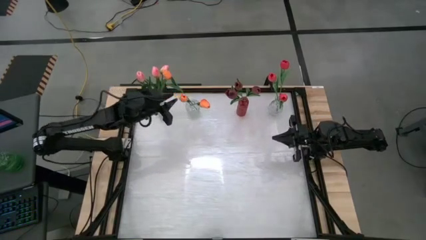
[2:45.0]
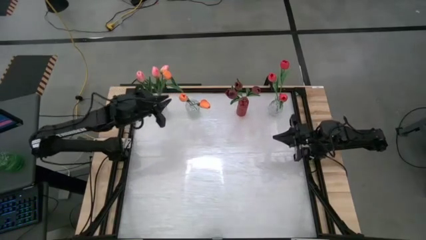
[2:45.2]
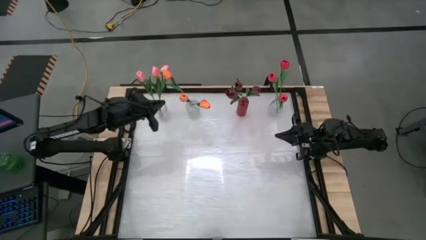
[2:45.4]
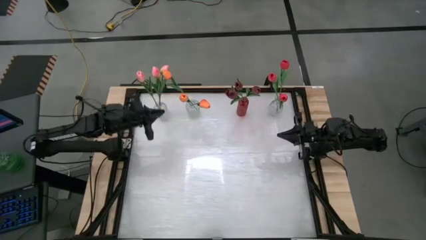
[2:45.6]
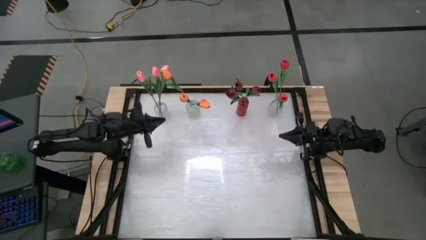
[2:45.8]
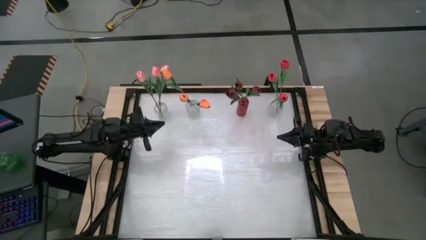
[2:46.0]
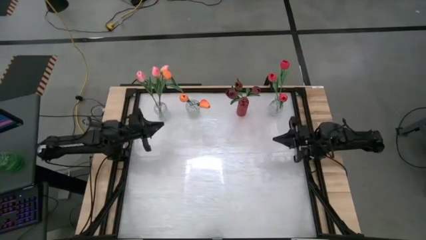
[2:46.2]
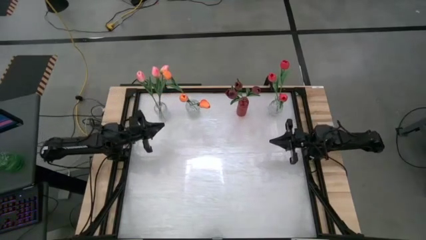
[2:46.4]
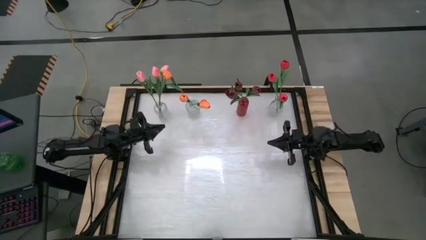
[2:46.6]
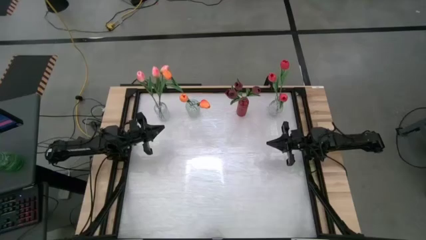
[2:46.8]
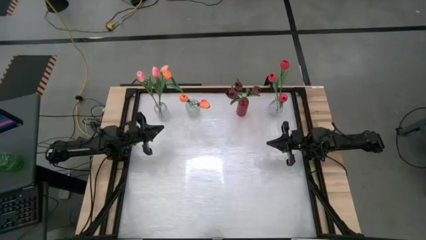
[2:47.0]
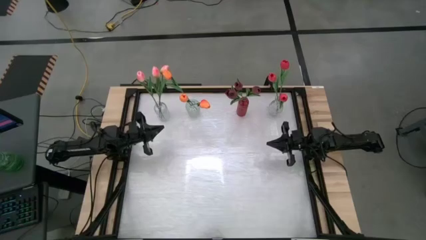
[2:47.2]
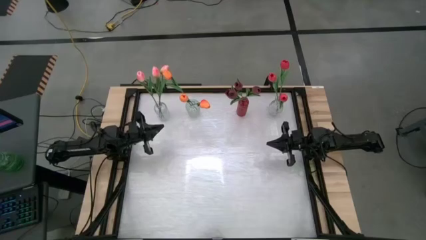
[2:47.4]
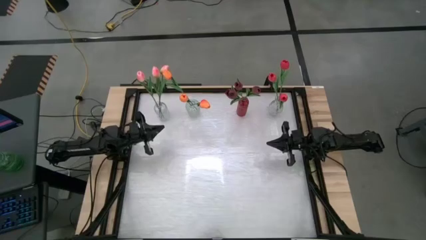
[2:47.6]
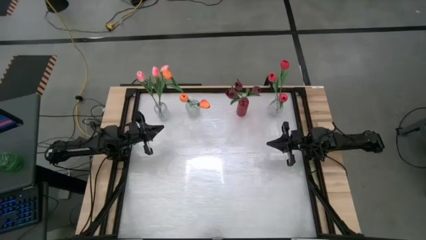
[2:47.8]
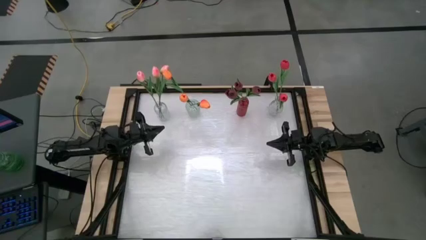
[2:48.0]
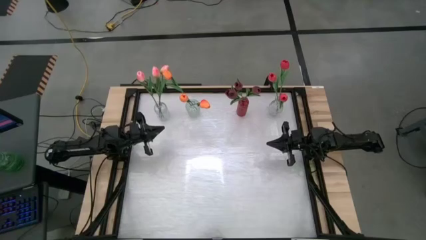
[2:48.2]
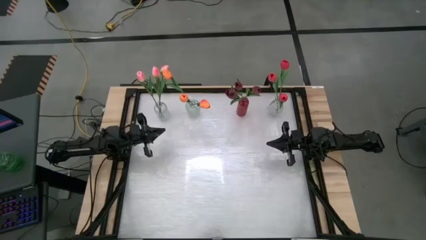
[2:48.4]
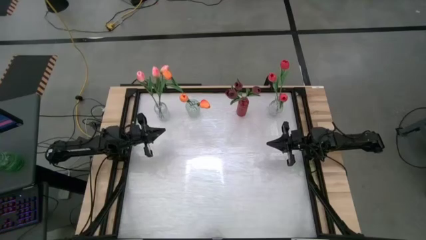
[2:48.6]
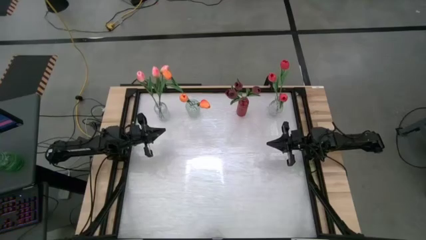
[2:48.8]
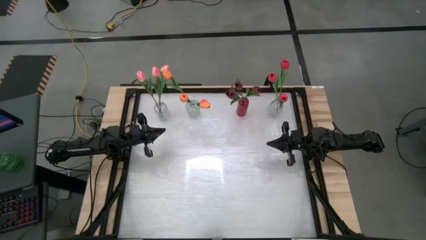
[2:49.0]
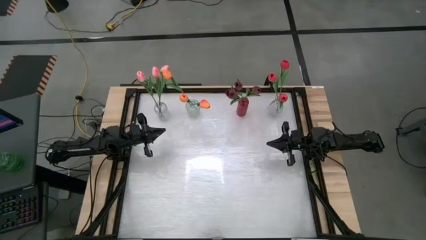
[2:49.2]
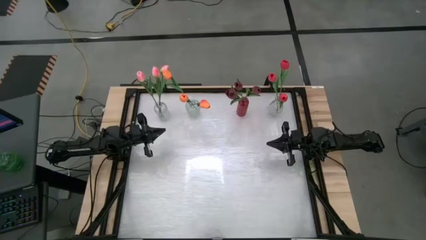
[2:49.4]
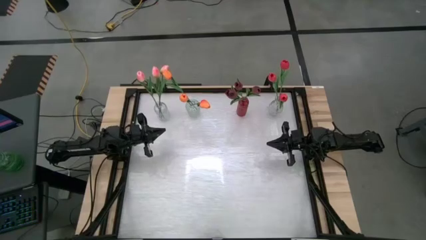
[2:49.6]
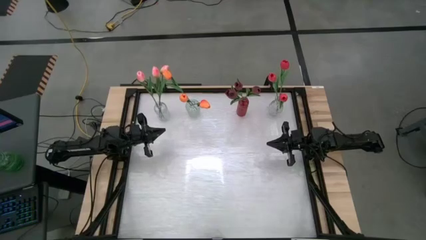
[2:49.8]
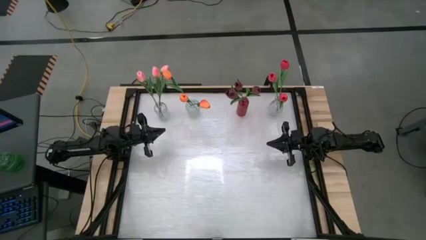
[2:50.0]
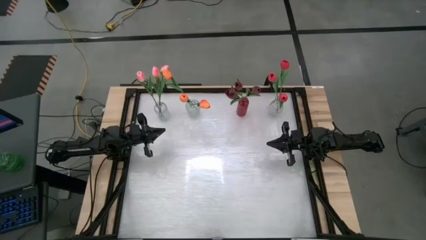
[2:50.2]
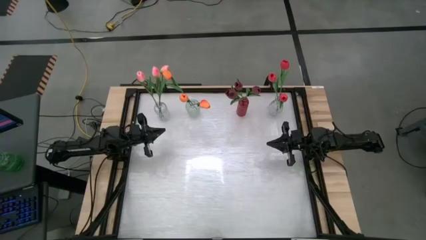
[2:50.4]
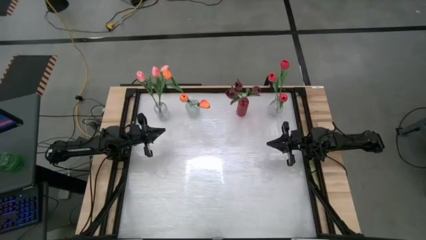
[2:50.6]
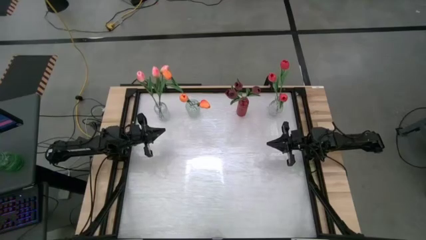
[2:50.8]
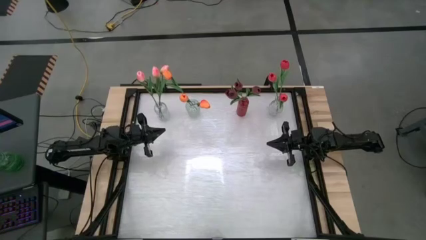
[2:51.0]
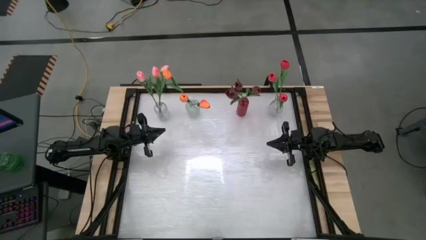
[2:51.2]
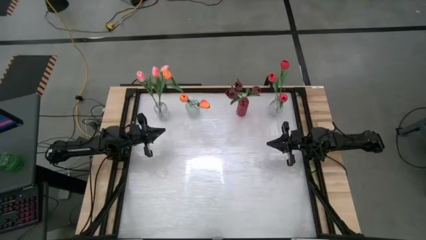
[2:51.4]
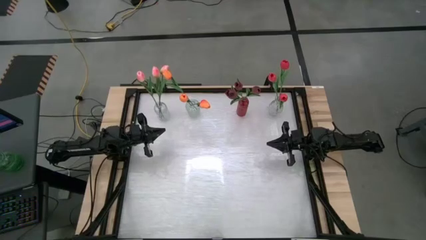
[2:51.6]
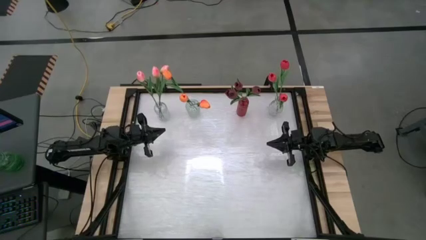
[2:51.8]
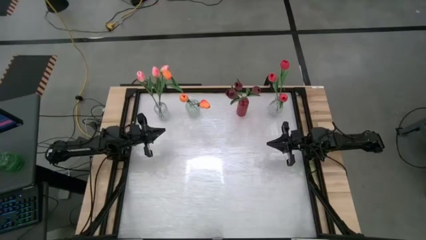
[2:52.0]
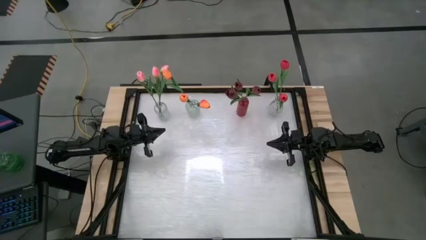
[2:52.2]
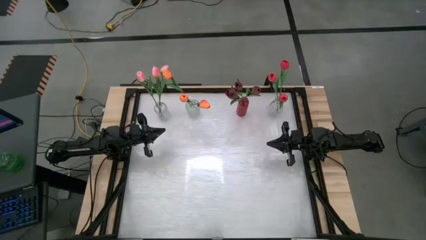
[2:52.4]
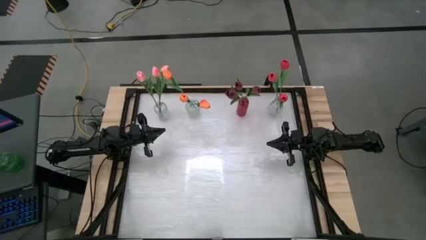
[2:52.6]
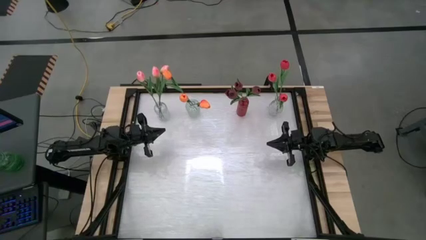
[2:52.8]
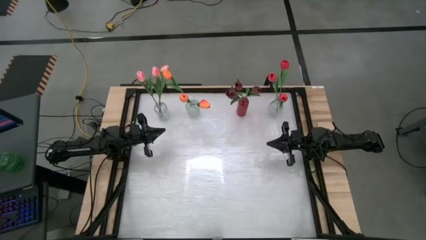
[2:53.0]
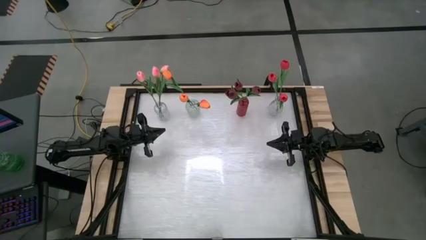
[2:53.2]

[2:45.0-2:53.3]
Task: Sort flowers into vase by color
Return to Home Position

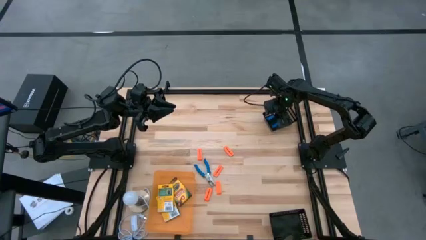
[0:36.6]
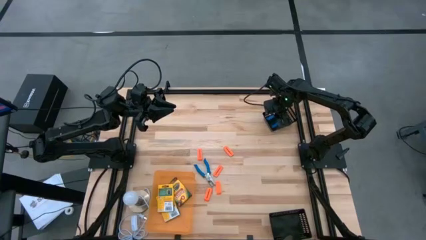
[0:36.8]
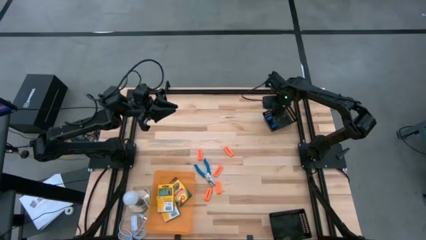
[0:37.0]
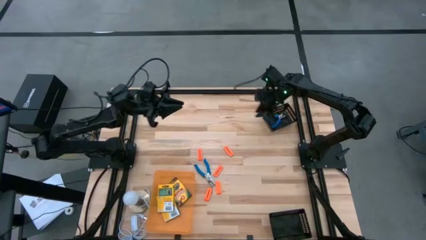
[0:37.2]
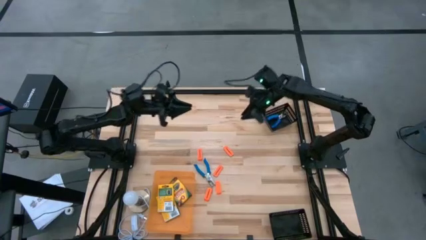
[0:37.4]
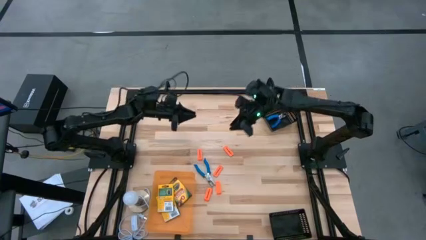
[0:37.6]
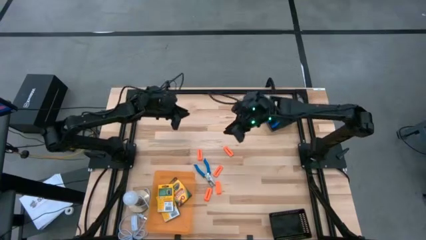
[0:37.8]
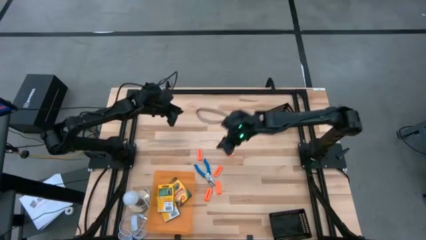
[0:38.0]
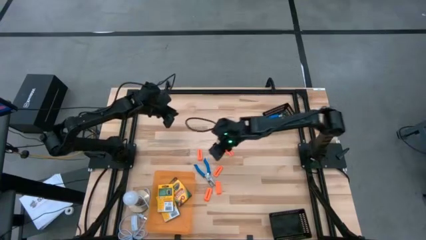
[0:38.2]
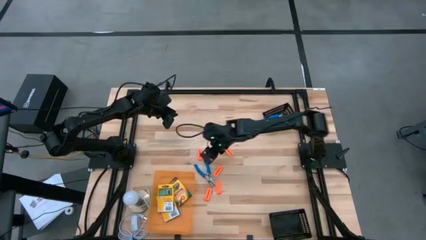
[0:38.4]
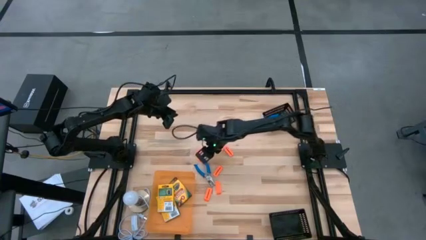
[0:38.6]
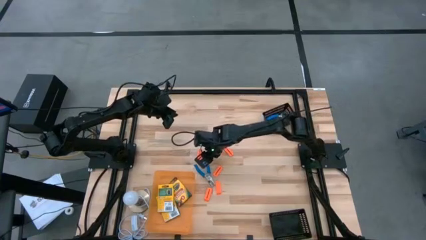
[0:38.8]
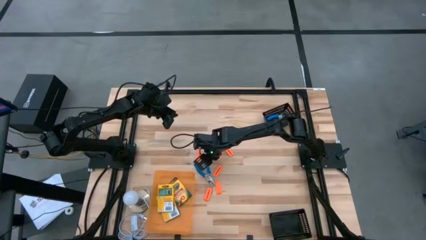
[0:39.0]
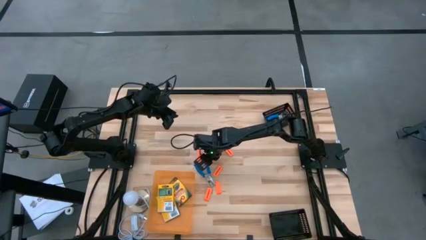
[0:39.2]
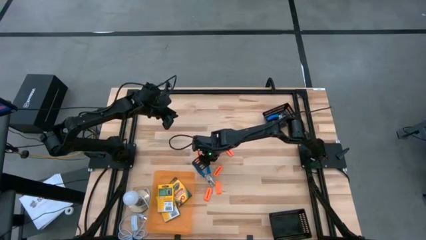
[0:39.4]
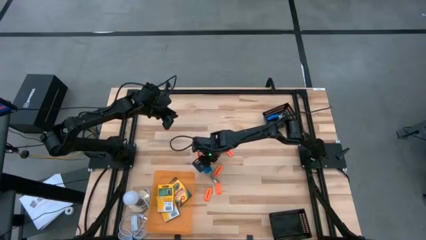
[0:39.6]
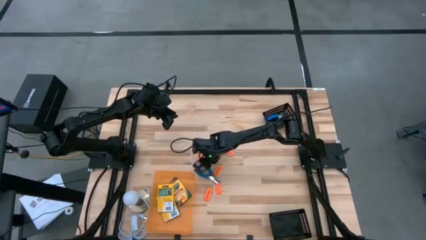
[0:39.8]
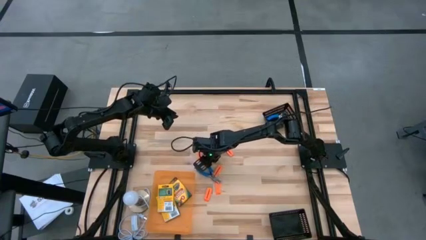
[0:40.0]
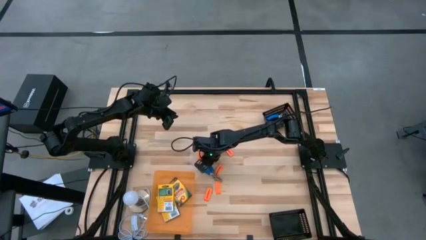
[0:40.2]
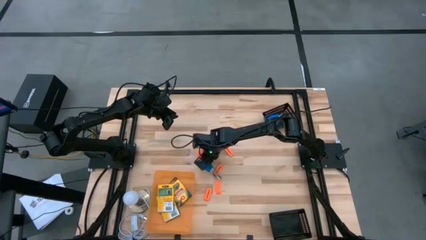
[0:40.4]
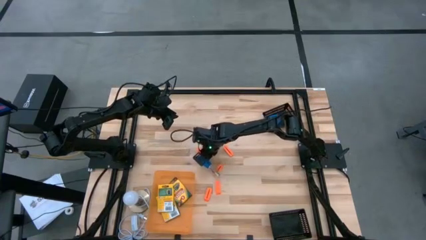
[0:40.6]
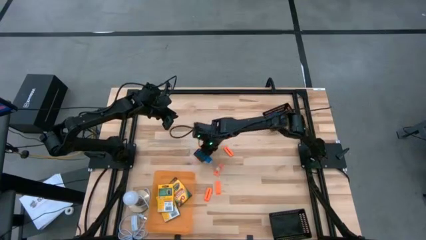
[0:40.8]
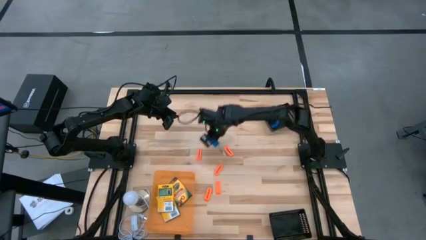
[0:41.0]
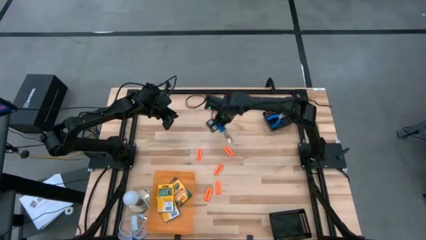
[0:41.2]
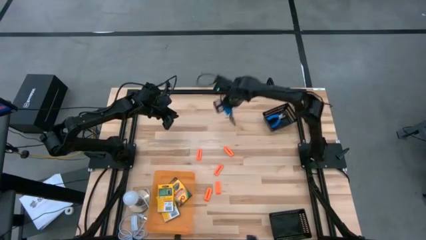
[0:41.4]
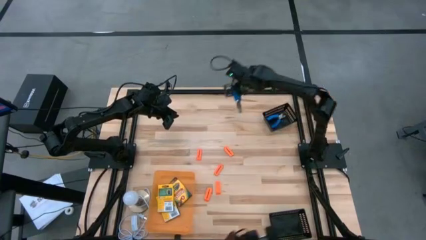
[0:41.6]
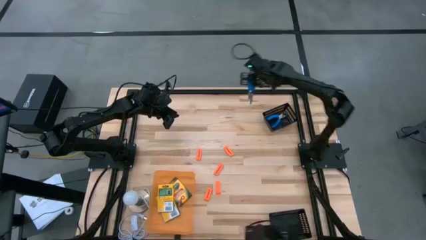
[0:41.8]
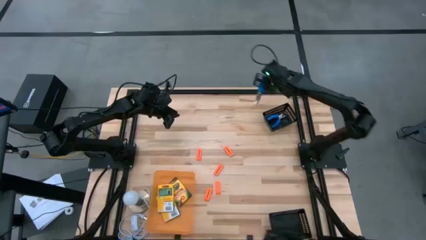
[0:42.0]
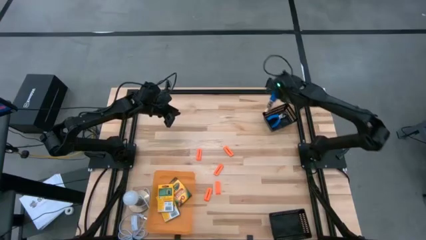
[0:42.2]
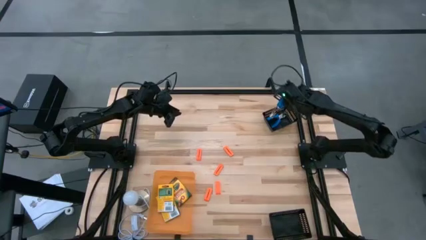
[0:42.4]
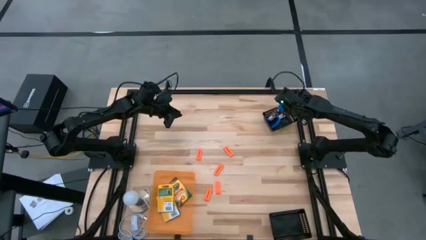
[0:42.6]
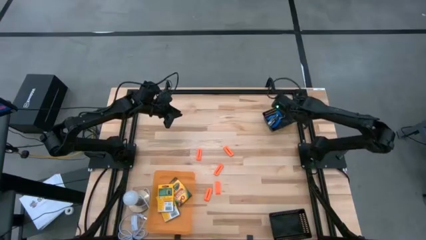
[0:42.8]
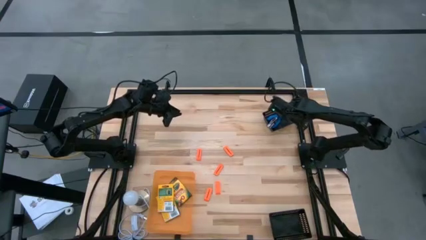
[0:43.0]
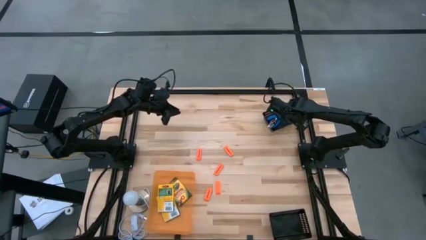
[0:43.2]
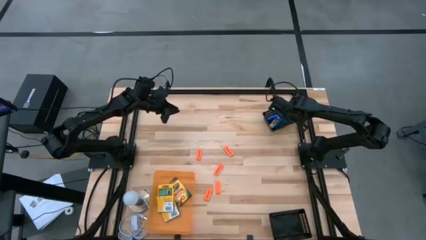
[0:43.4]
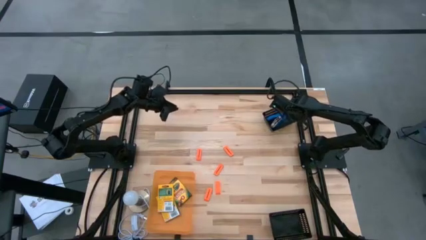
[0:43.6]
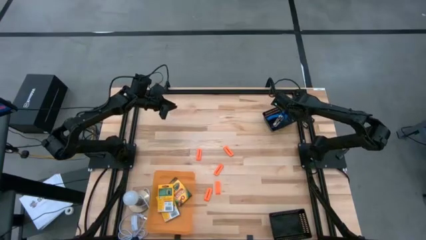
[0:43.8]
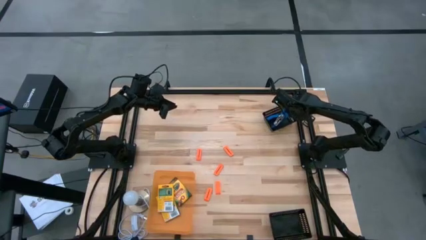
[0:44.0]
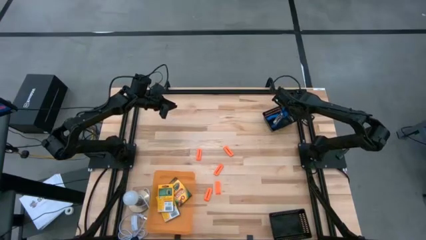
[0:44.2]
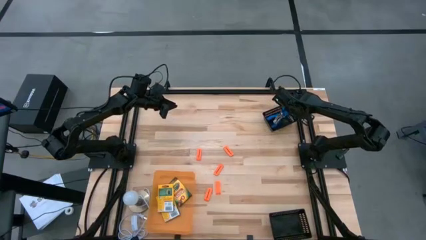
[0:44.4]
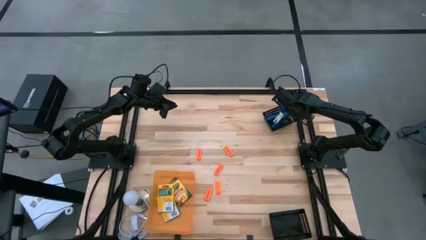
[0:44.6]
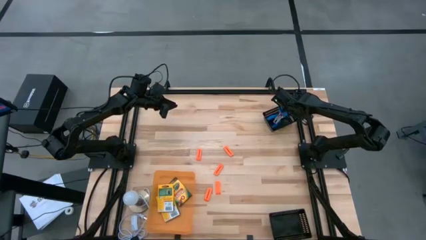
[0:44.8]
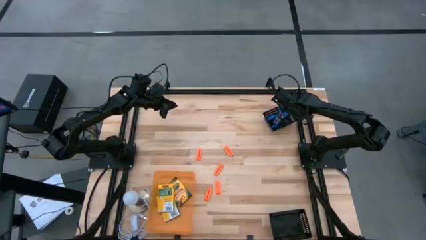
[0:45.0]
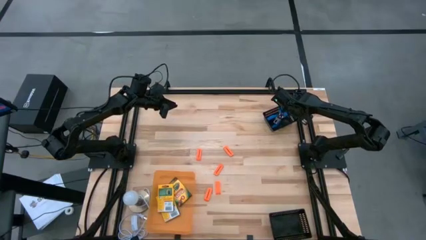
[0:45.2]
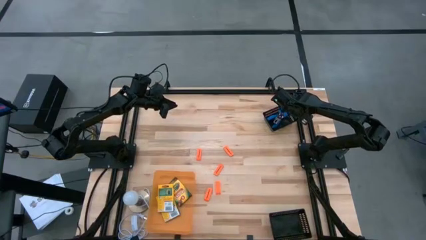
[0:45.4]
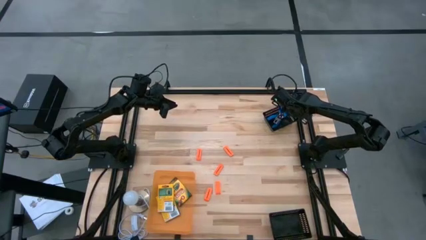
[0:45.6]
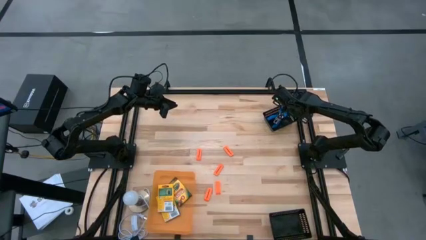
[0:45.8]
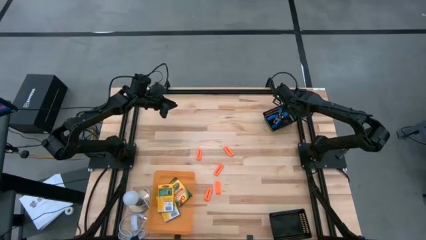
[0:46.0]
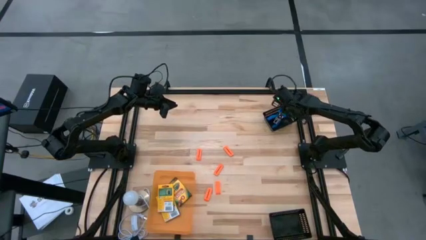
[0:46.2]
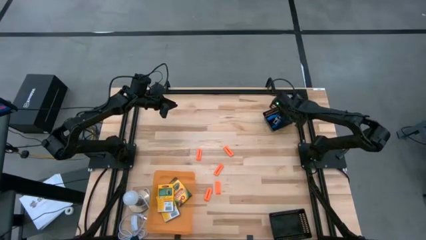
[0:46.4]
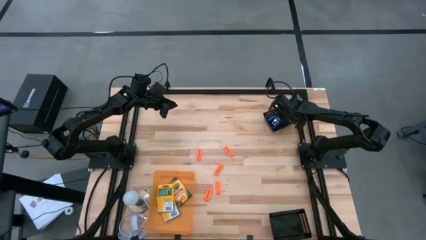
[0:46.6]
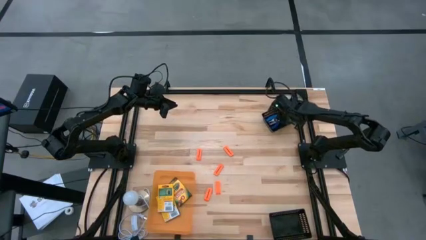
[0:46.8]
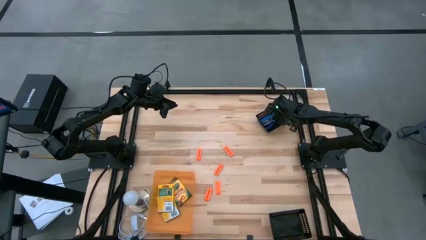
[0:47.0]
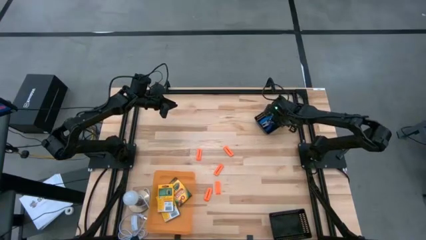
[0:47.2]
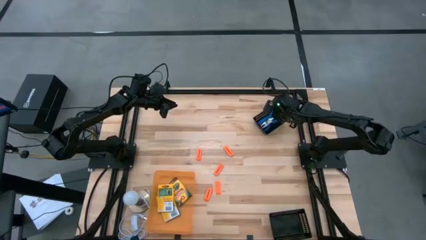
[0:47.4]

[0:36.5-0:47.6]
Task: Pick & Place School Supplies
Put the blue hole puncher into the top black bin
